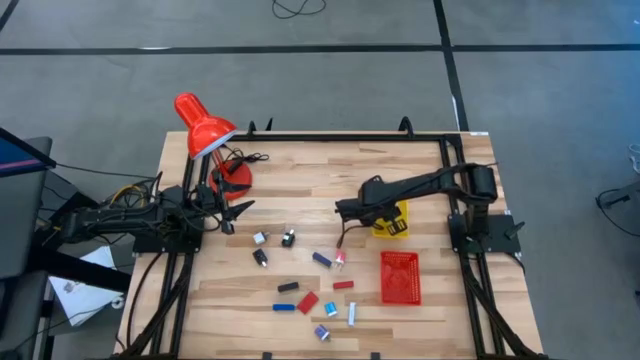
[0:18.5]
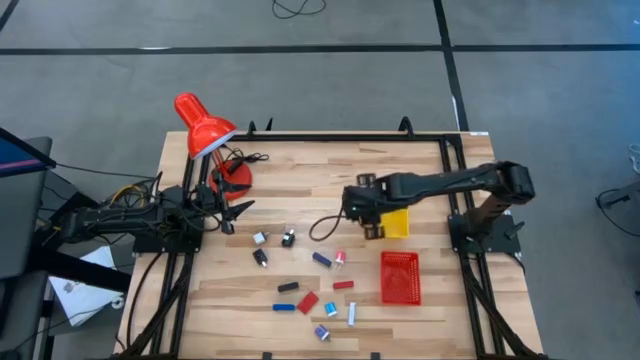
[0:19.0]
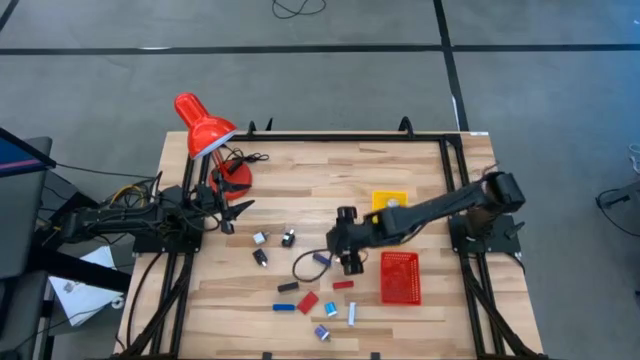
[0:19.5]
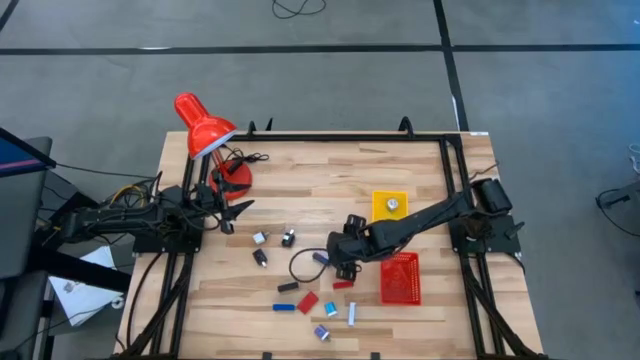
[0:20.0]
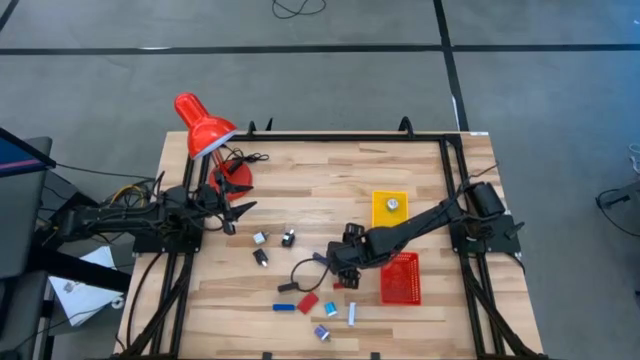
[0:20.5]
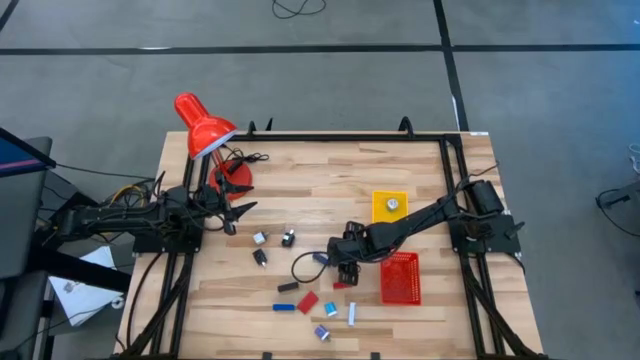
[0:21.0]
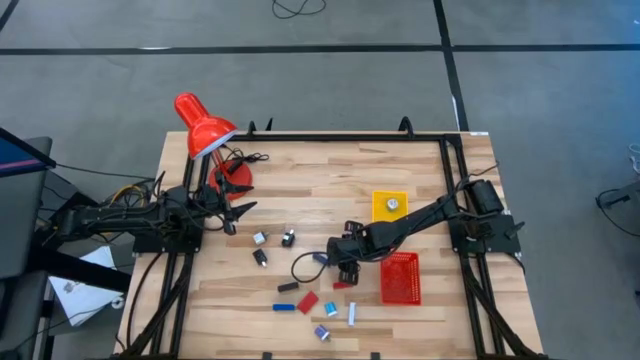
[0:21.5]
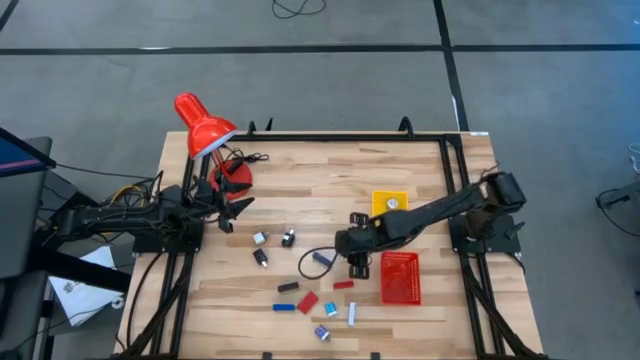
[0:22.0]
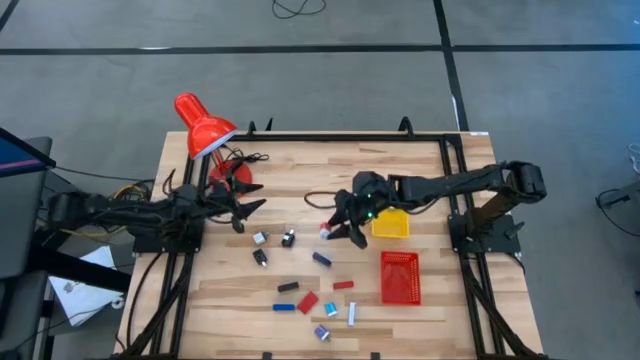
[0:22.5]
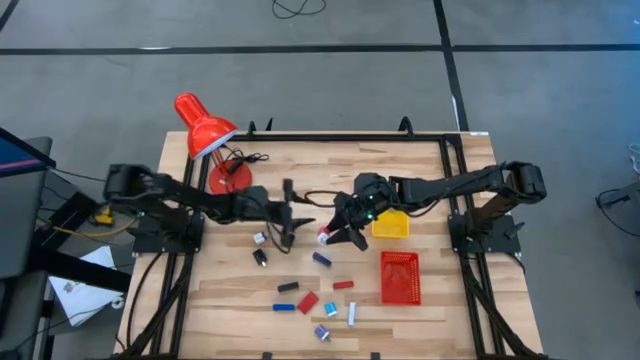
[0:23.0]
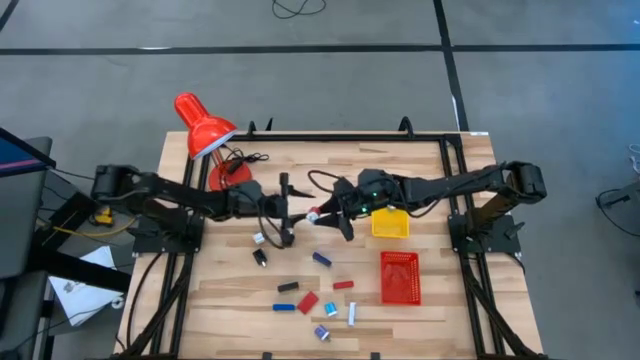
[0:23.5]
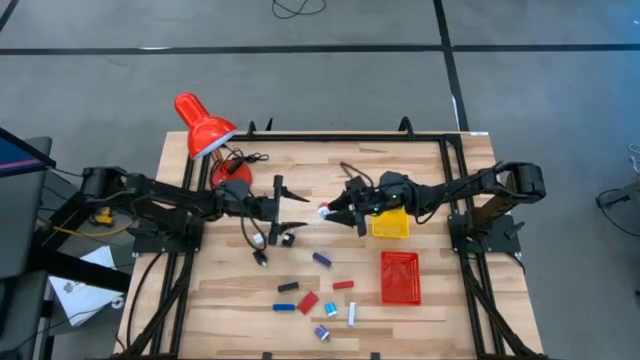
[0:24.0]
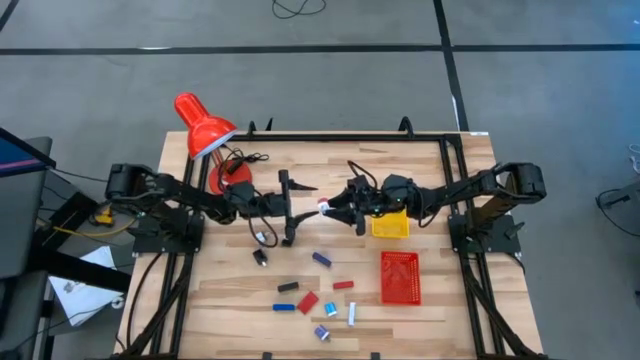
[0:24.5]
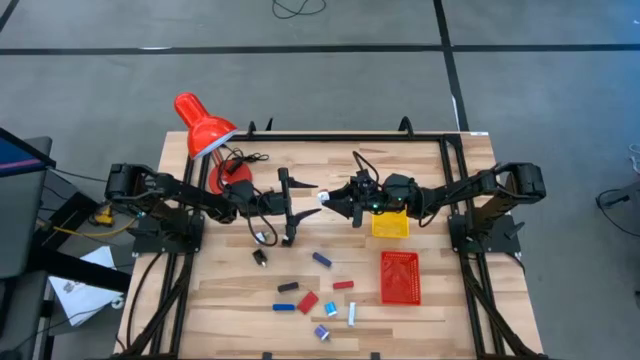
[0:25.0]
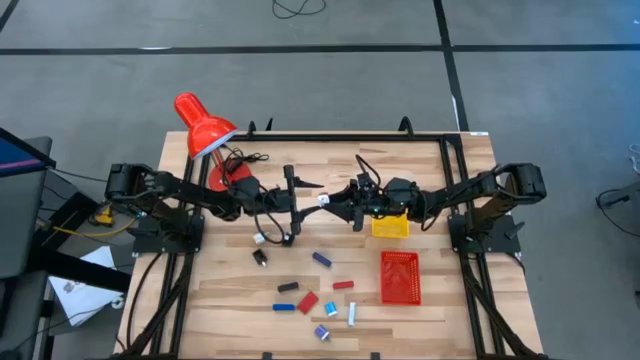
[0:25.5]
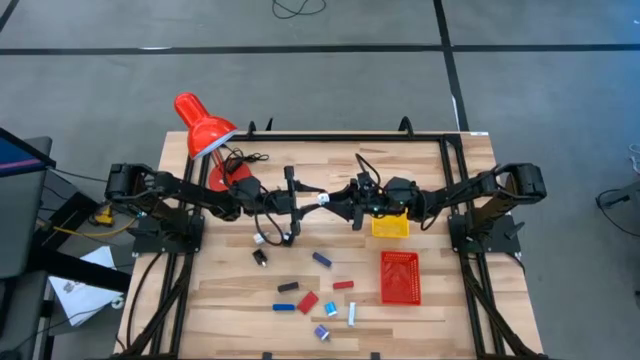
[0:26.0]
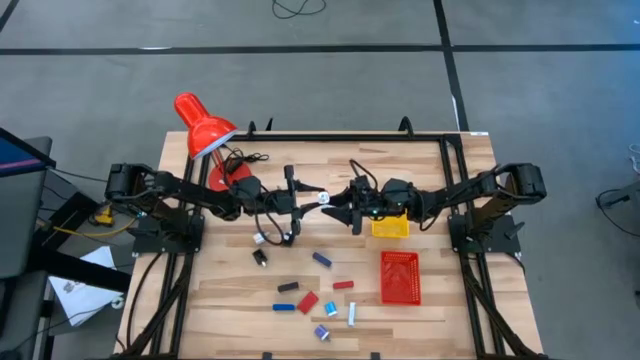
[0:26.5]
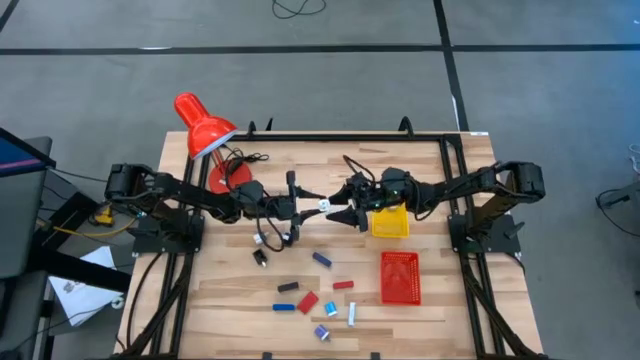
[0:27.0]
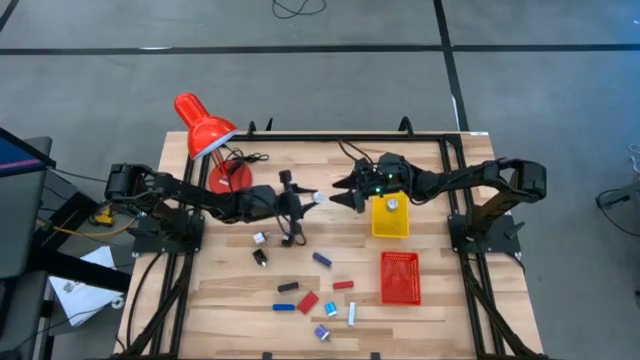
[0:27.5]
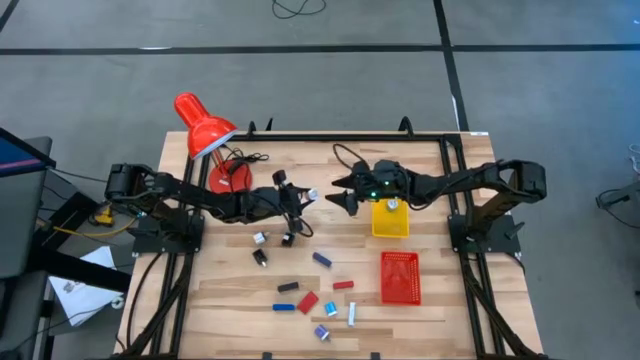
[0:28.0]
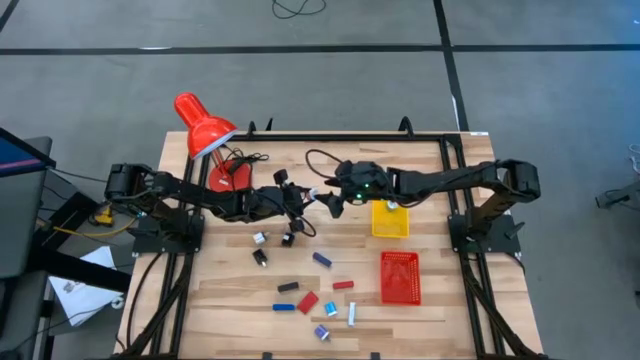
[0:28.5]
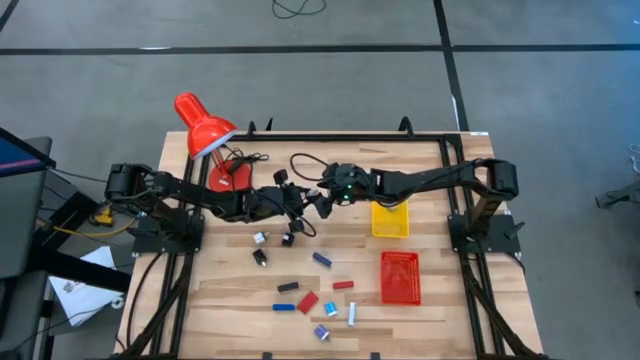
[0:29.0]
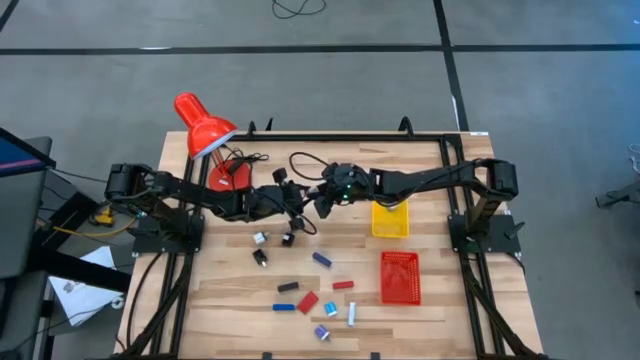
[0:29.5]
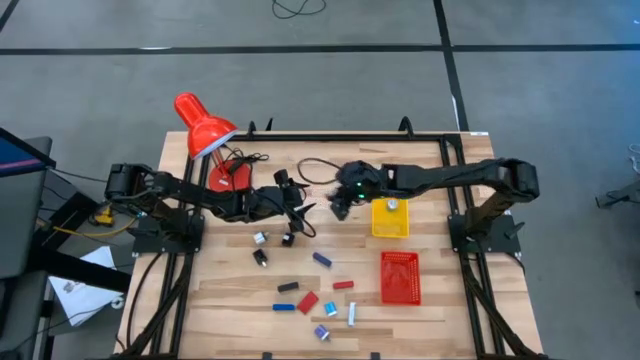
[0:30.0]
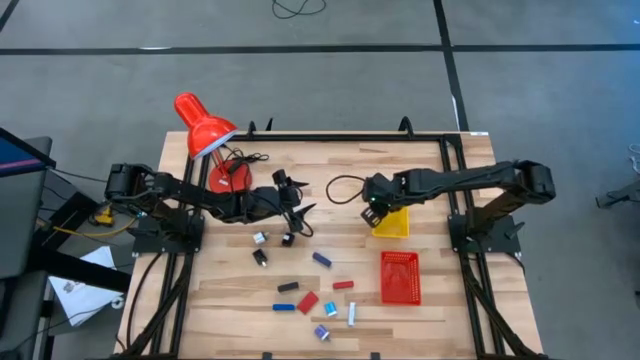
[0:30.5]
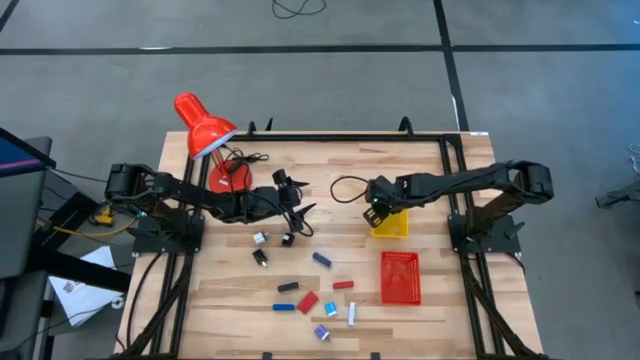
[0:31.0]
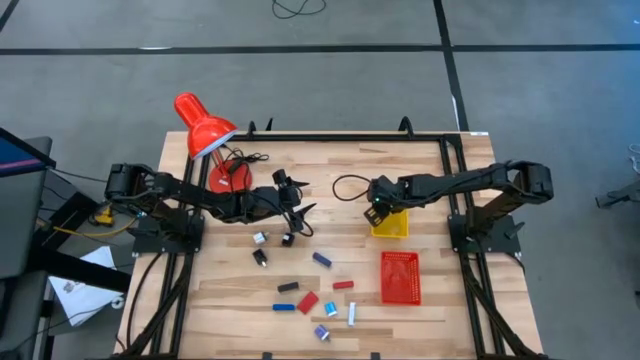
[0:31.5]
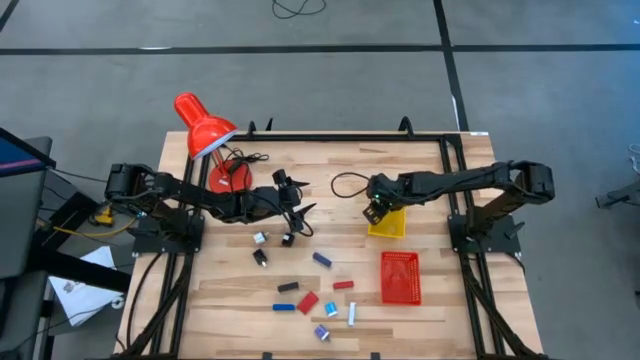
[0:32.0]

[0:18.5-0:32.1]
Task: Pick & Place Office items
Put pink charger adapter into the yellow bin

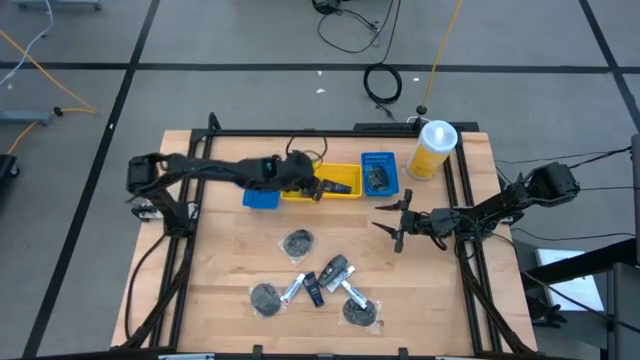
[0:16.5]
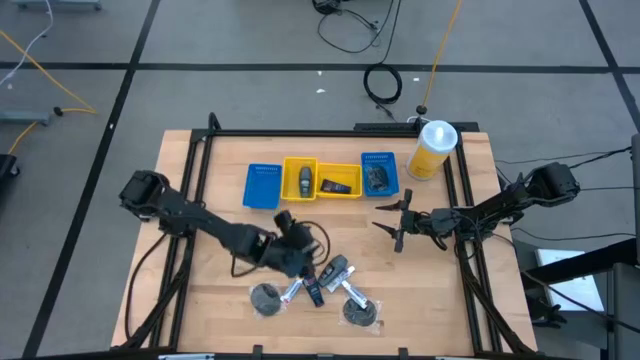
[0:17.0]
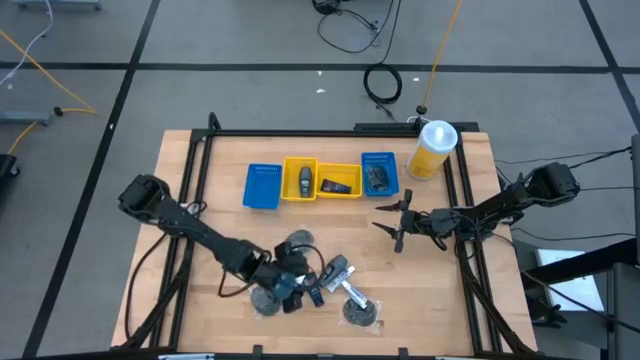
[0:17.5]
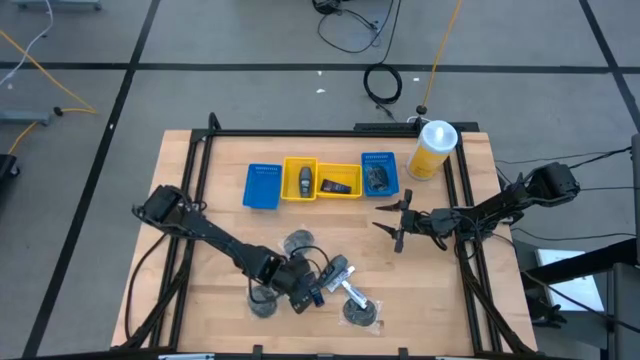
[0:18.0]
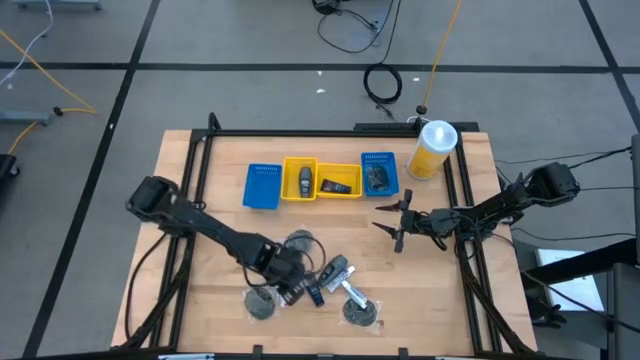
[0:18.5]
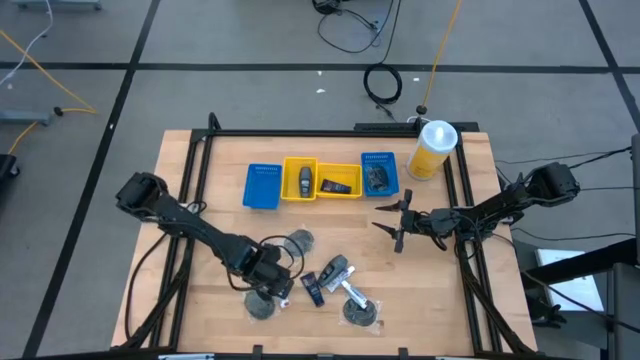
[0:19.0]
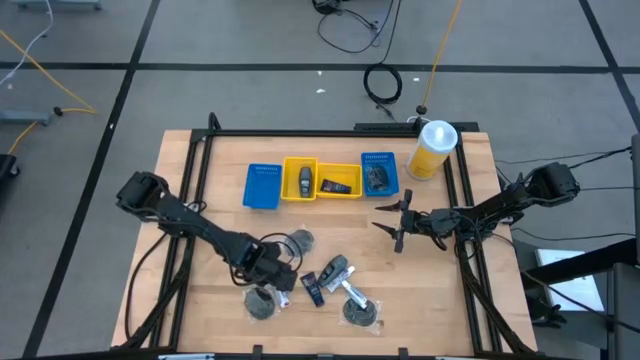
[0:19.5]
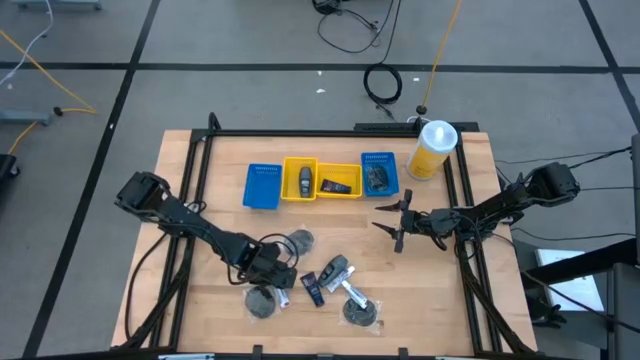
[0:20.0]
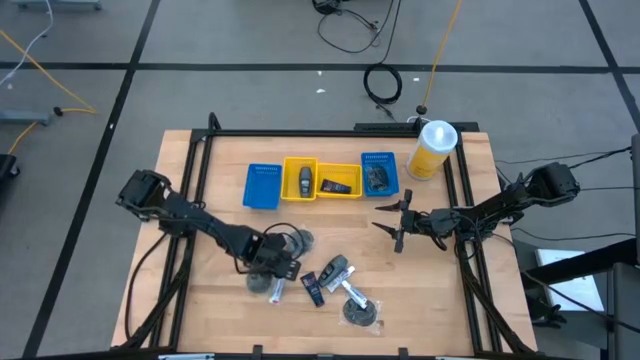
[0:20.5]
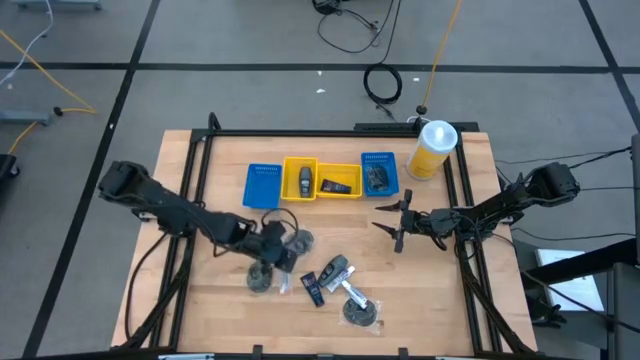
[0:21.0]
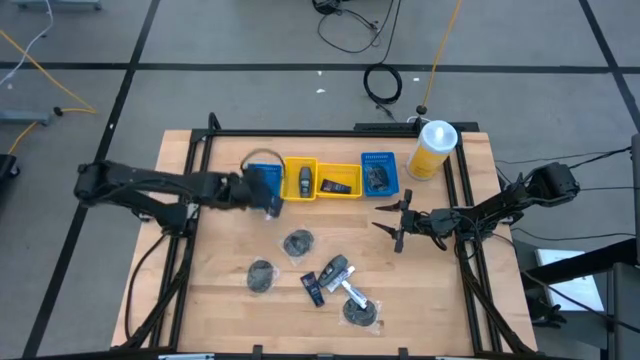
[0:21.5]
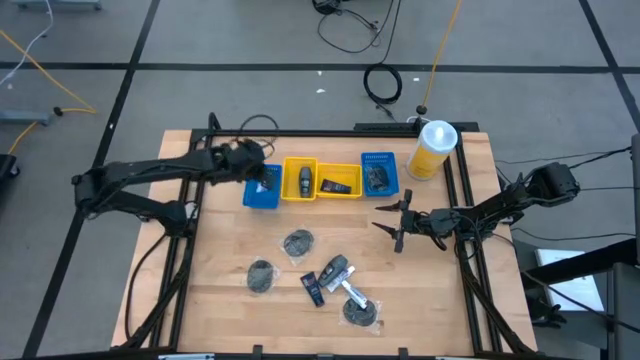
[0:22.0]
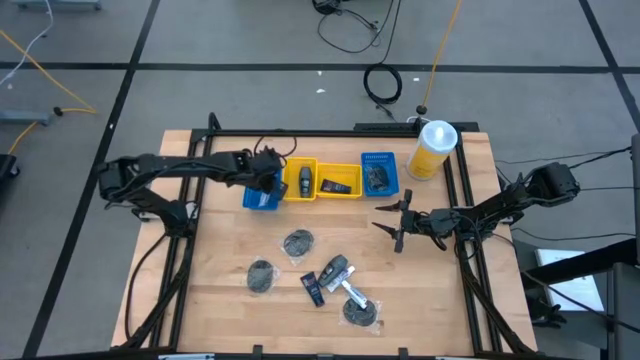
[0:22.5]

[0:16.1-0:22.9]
Task: Pick & Place Travel size toiletries
Put the toothpaste into the left blue basket

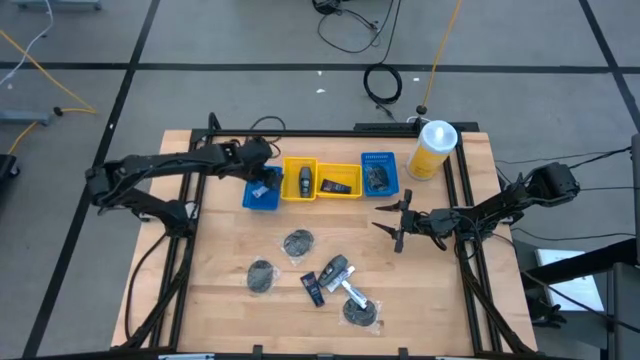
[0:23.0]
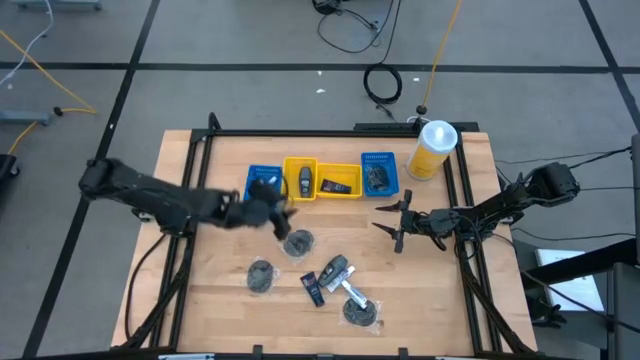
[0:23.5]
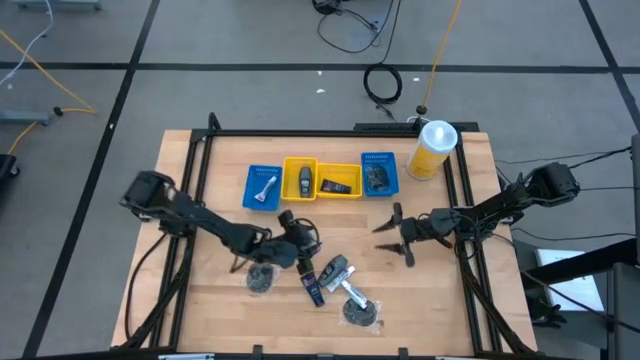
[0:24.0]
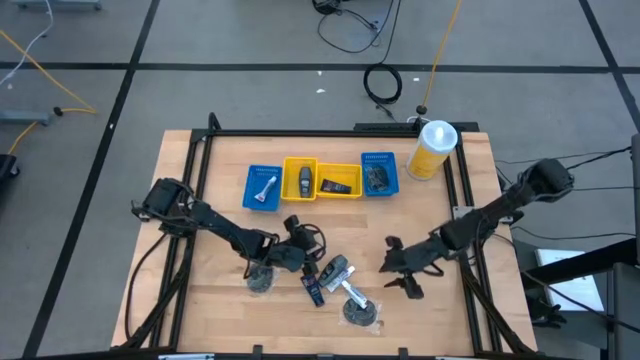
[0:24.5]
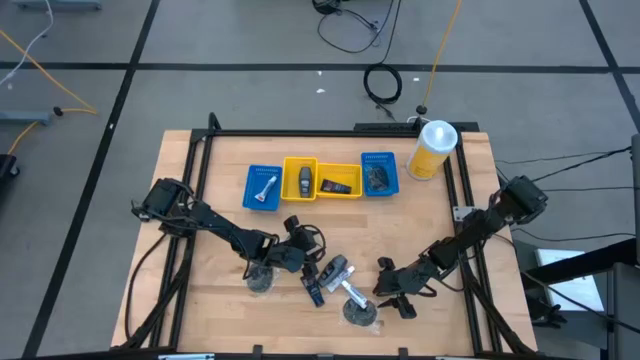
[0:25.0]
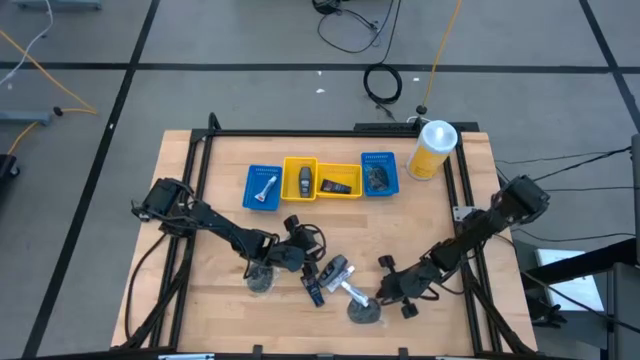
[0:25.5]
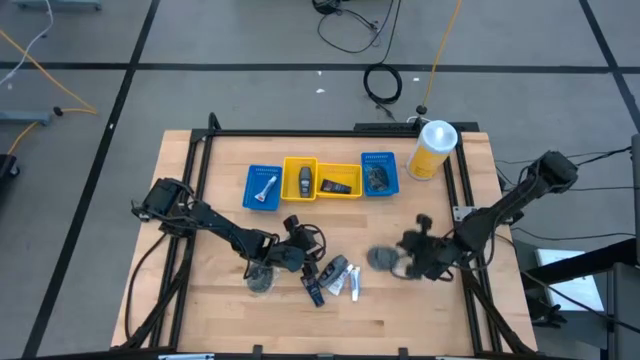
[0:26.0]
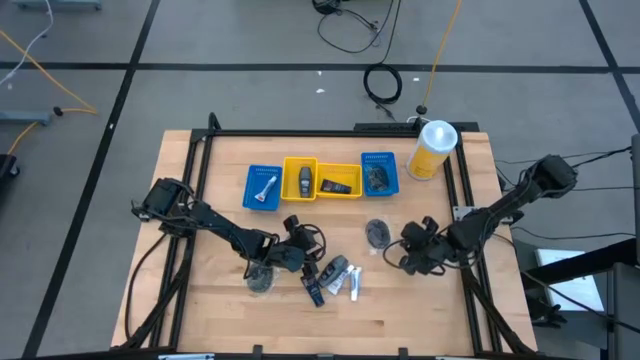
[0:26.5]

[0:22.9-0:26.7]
Put the hairbrush into the right blue basket
